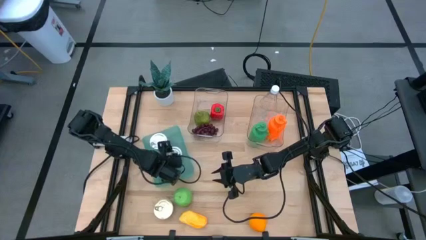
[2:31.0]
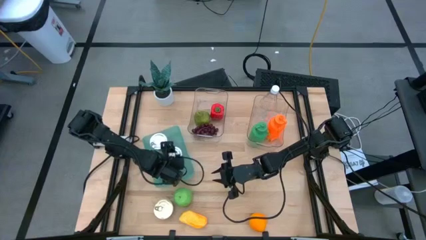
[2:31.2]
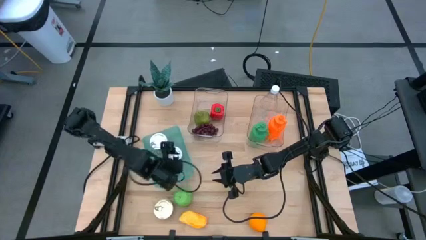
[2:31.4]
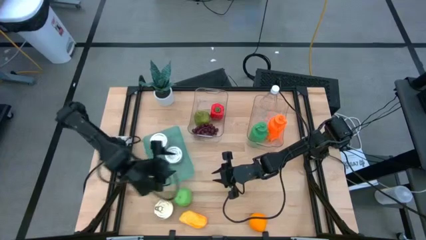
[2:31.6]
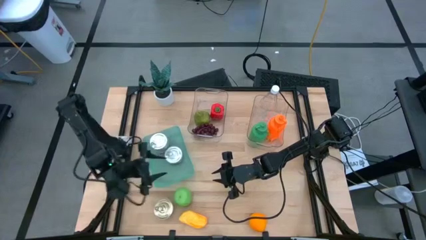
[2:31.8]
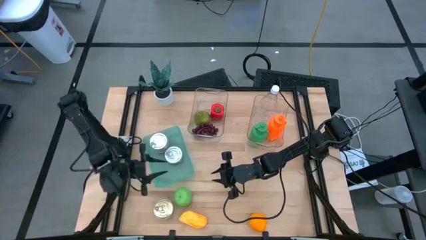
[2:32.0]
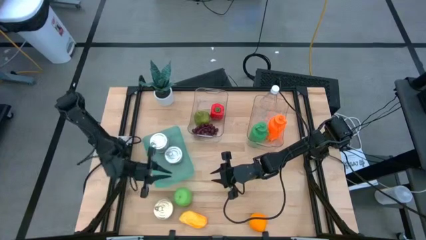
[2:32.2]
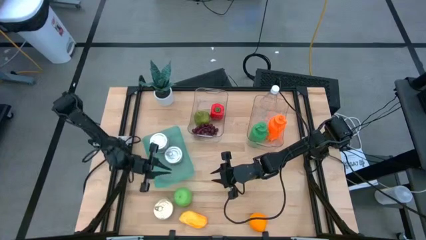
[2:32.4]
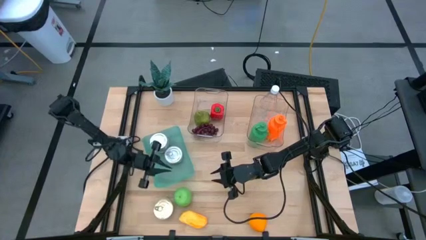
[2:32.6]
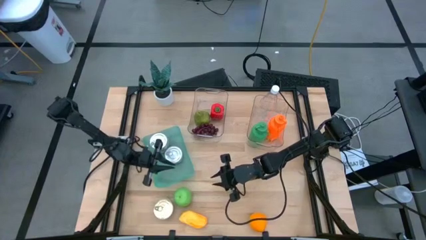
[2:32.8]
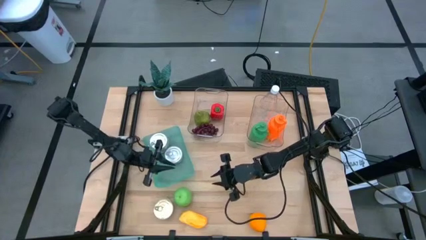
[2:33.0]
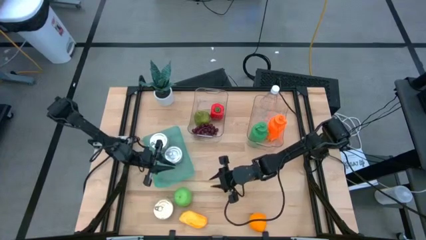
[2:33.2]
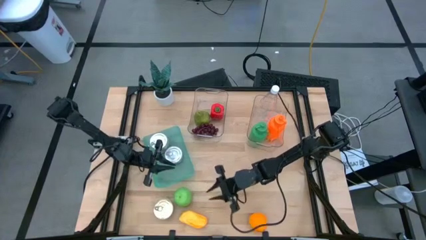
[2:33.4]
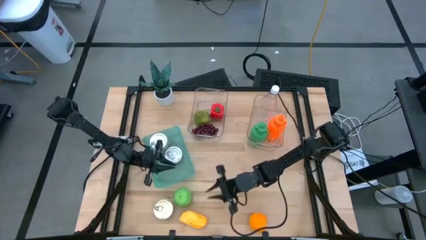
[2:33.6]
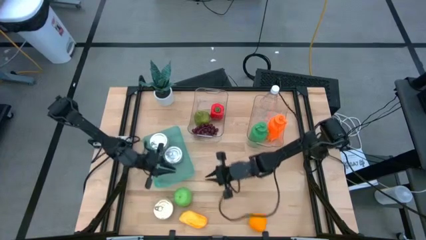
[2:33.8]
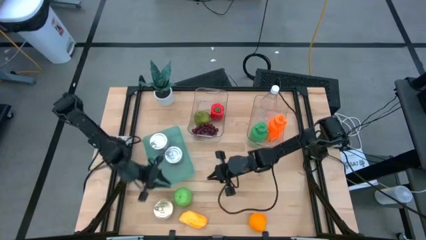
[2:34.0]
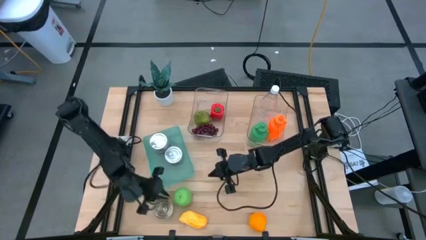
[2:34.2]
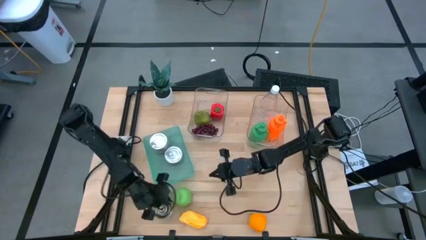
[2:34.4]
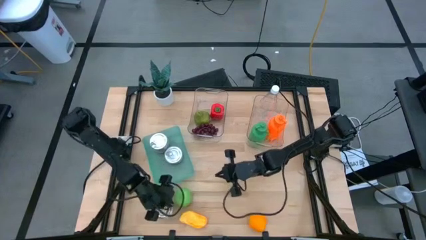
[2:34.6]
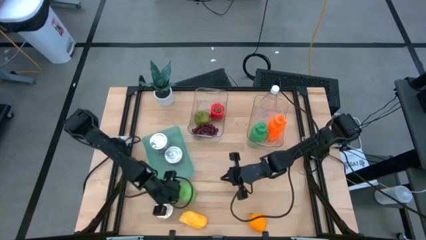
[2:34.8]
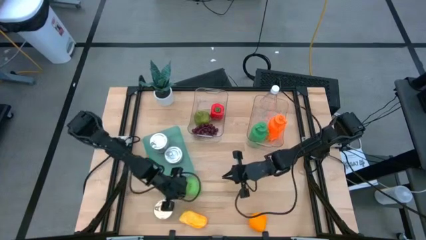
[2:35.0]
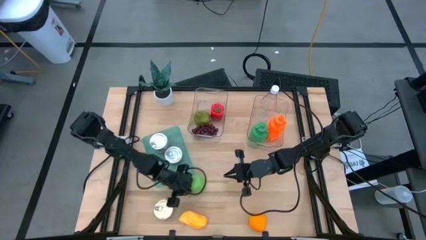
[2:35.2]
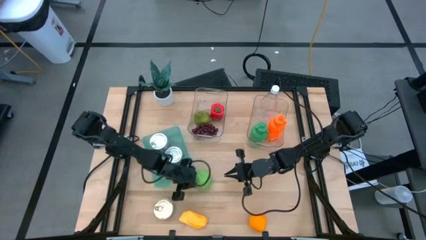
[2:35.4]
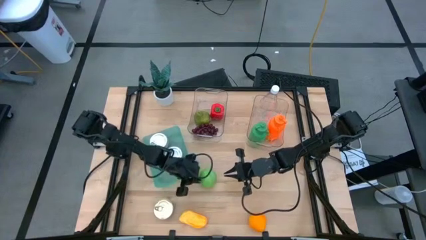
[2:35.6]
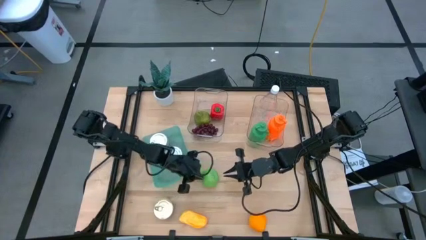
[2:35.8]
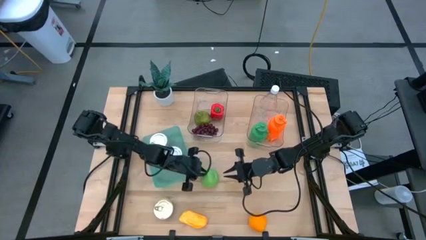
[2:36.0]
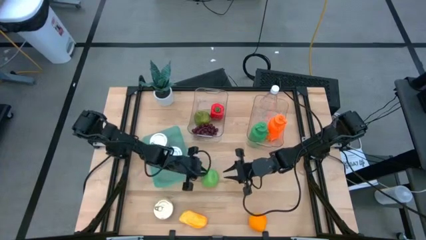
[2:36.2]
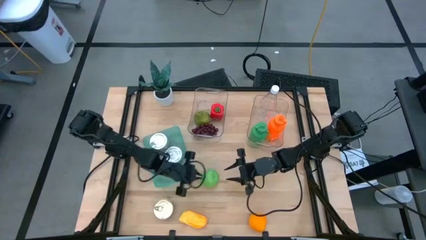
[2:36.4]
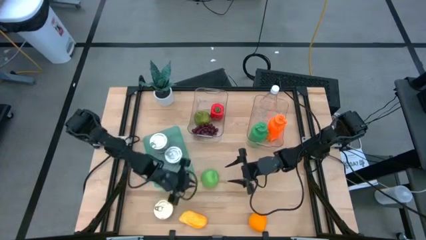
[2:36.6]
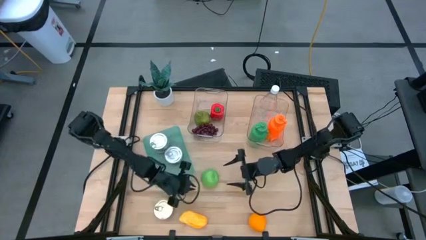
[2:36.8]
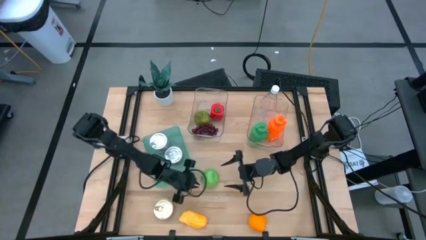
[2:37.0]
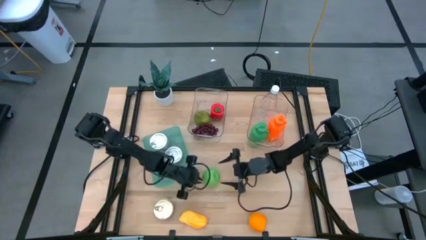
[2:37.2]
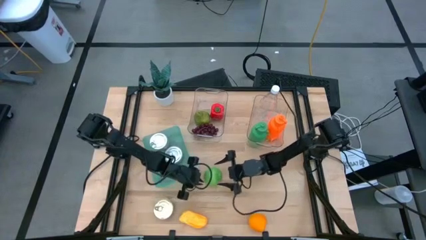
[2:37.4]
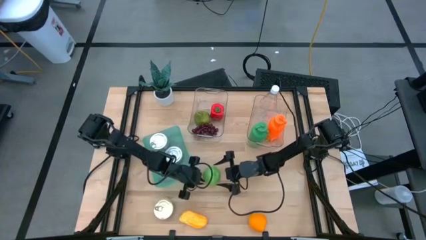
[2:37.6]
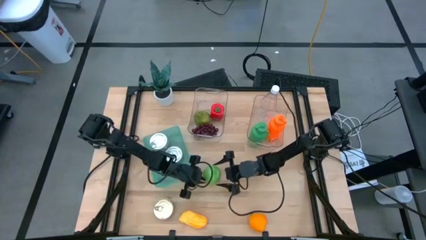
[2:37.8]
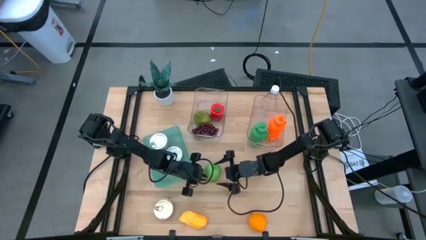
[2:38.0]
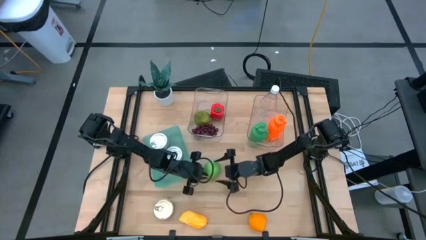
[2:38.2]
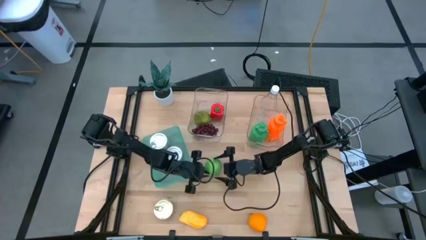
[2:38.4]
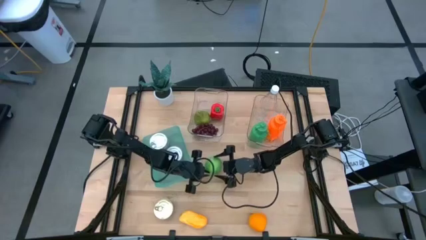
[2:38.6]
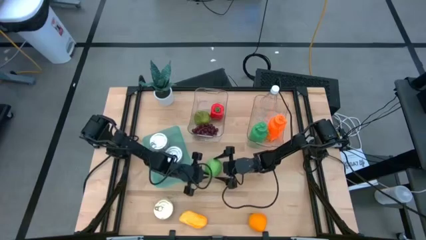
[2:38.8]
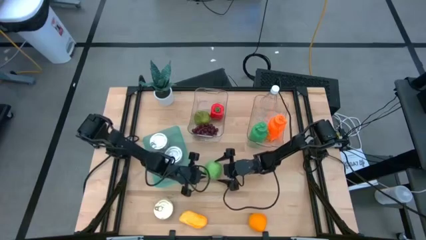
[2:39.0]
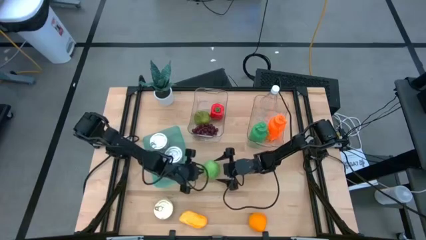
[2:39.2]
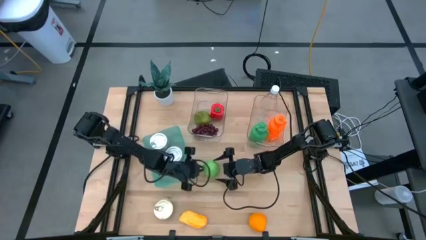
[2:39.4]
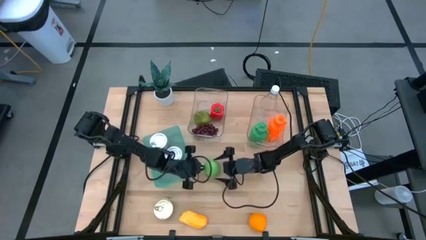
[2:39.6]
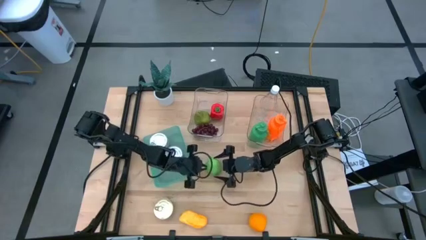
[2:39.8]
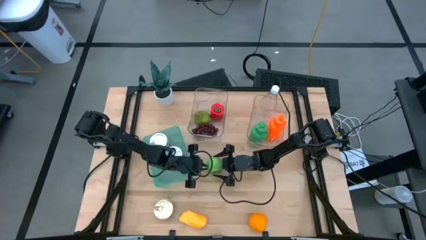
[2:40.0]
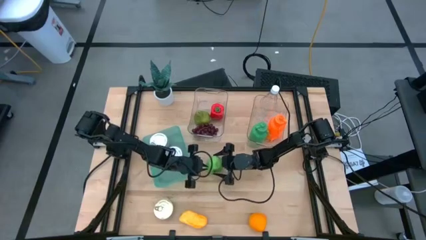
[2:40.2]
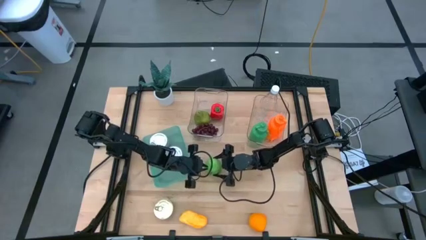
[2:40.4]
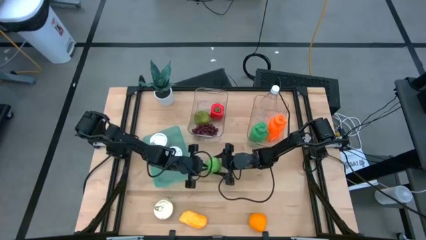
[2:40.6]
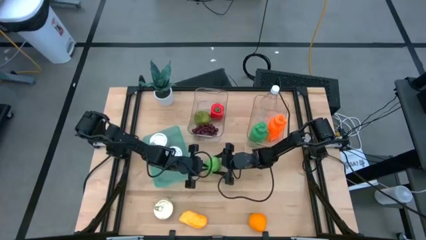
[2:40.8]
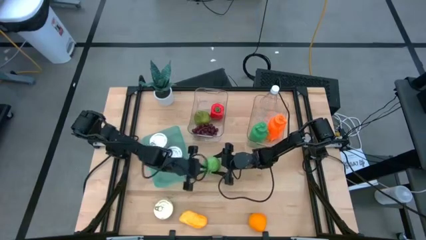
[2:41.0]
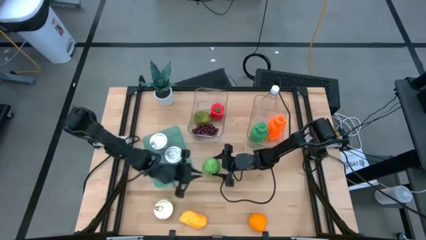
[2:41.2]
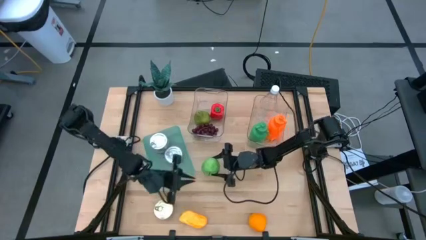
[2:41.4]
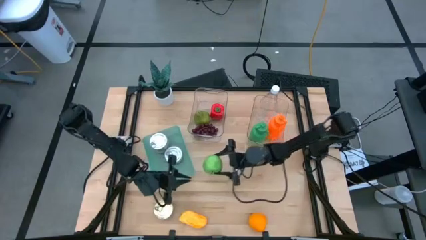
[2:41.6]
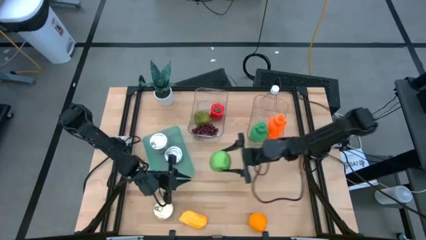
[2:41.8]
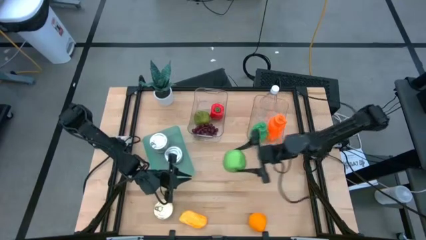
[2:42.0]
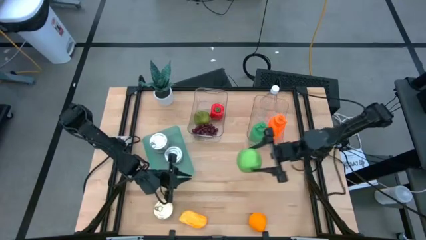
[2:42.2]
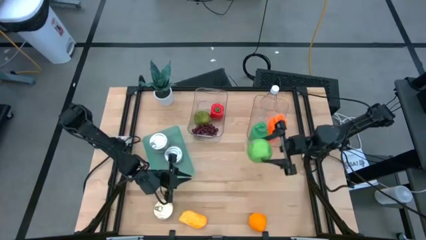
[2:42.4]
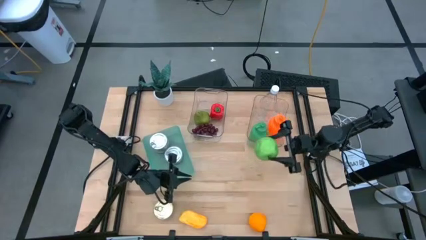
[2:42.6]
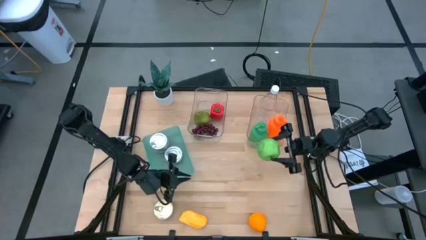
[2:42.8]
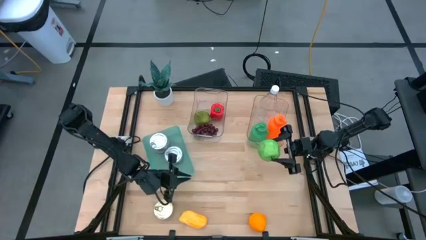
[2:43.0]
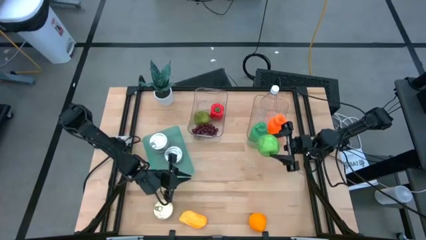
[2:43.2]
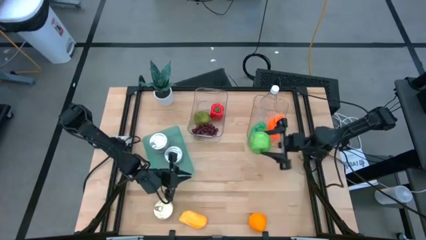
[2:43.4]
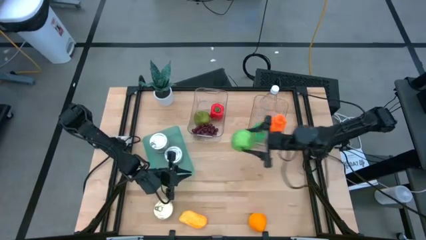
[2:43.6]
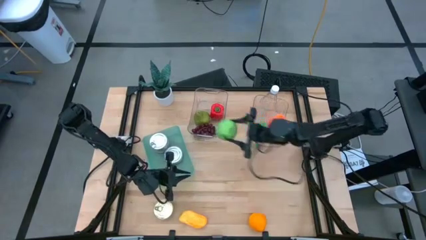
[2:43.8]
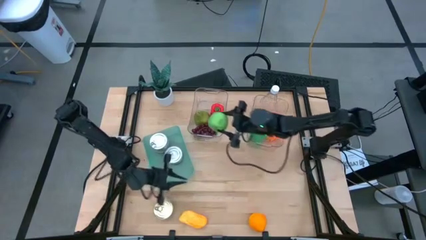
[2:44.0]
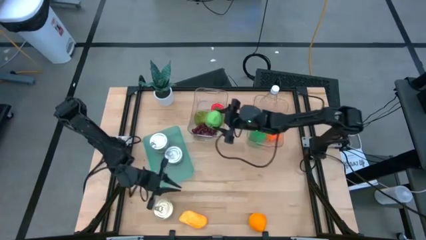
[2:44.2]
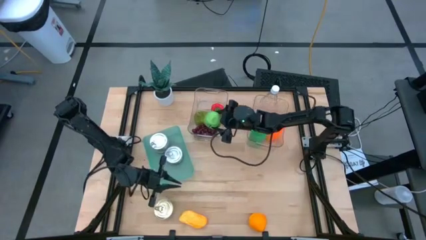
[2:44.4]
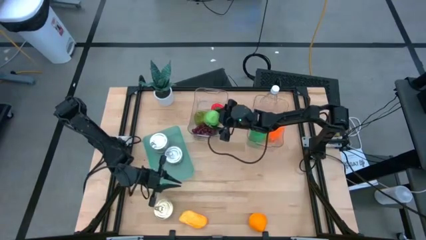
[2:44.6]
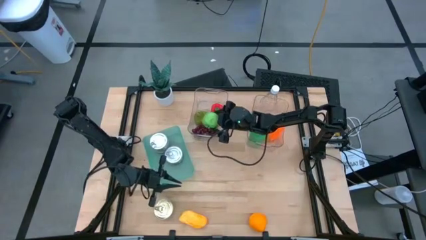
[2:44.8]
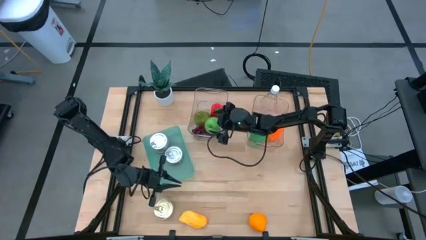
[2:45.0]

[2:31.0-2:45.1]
Task: Pick & Place Food Item
Put the apple into the left transparent bin
